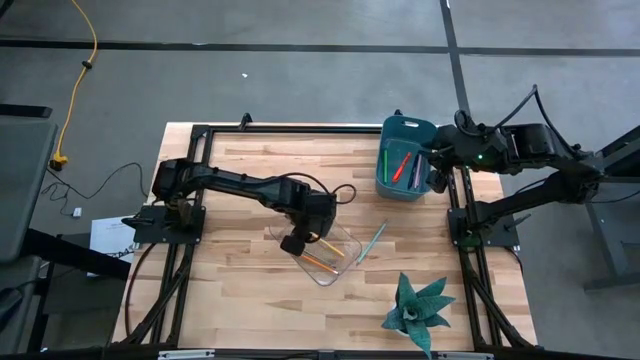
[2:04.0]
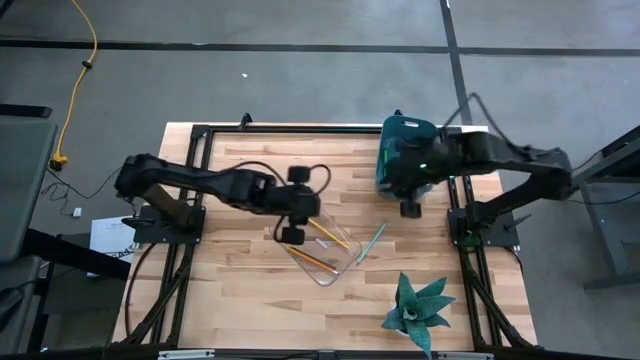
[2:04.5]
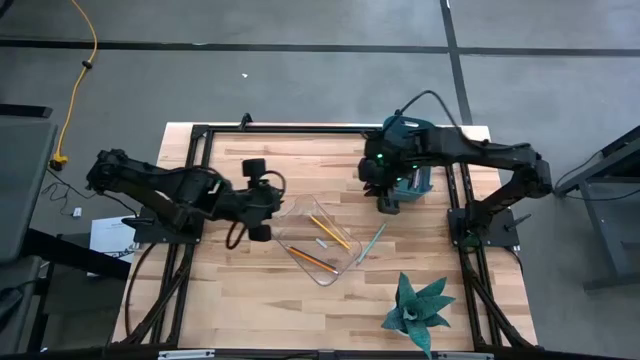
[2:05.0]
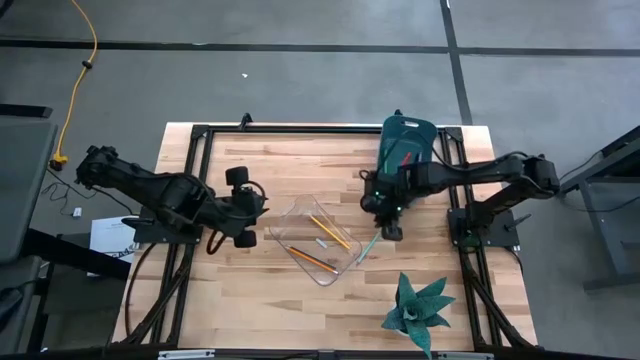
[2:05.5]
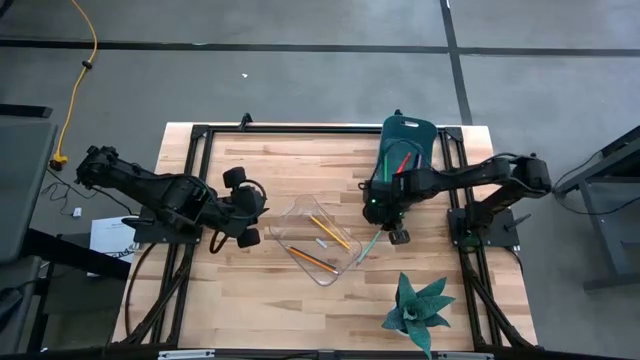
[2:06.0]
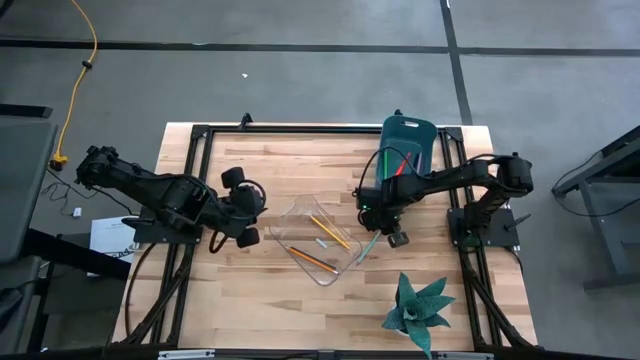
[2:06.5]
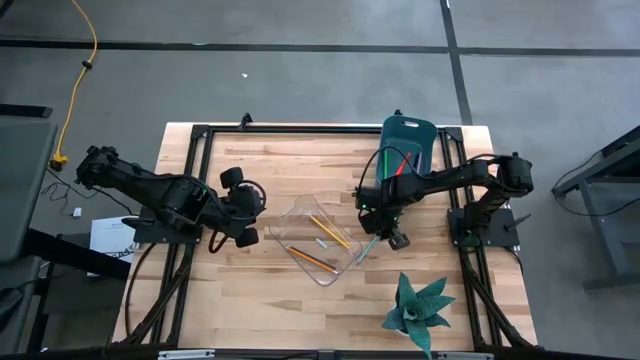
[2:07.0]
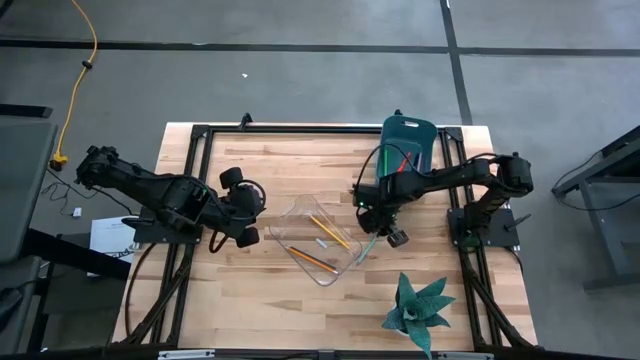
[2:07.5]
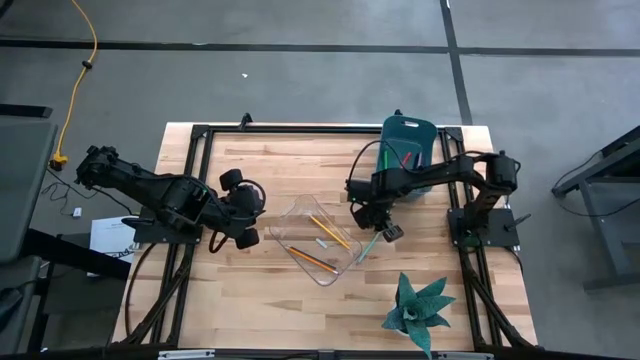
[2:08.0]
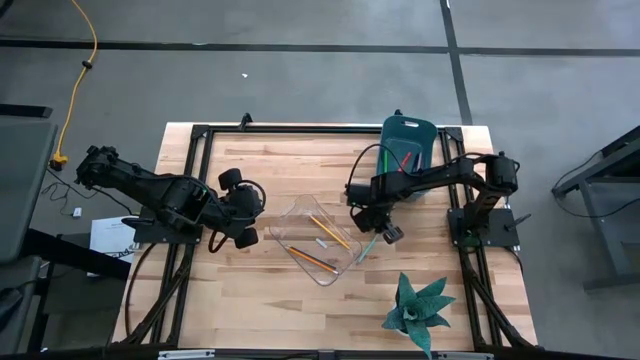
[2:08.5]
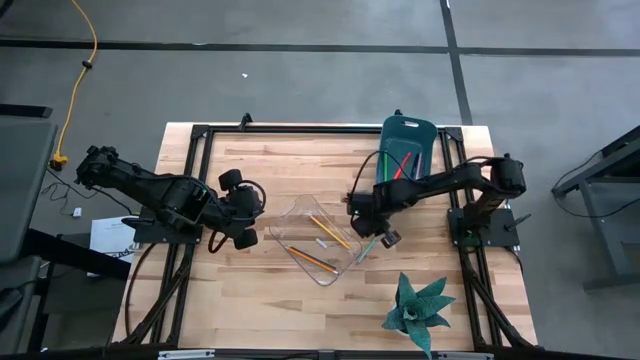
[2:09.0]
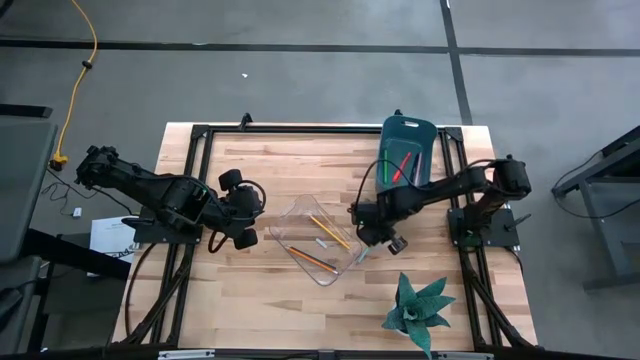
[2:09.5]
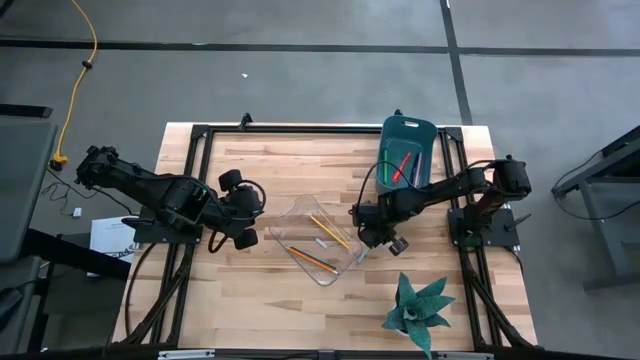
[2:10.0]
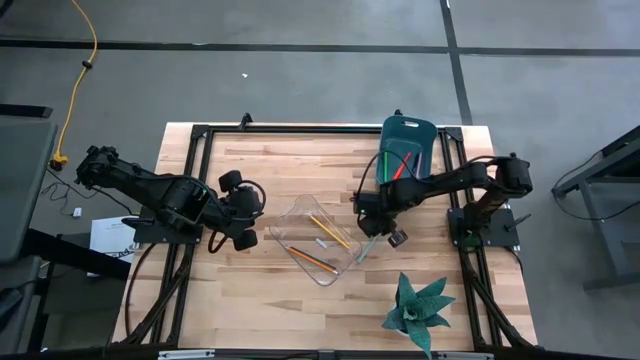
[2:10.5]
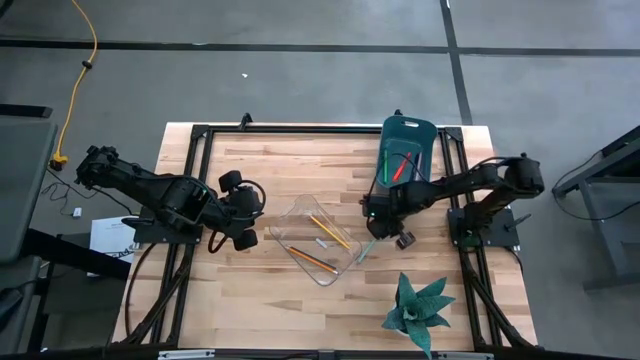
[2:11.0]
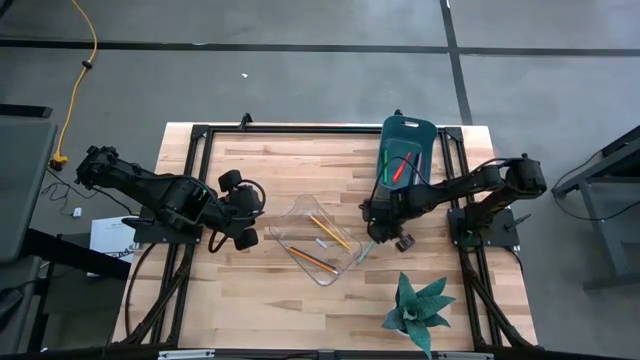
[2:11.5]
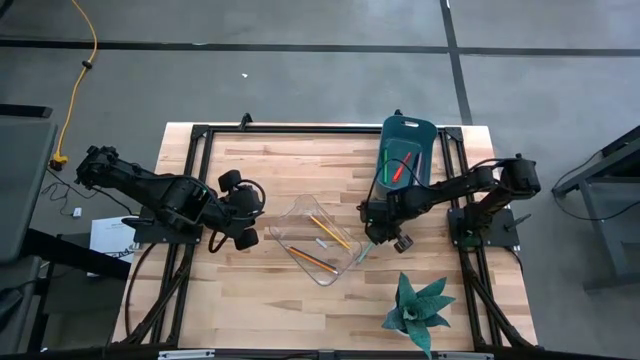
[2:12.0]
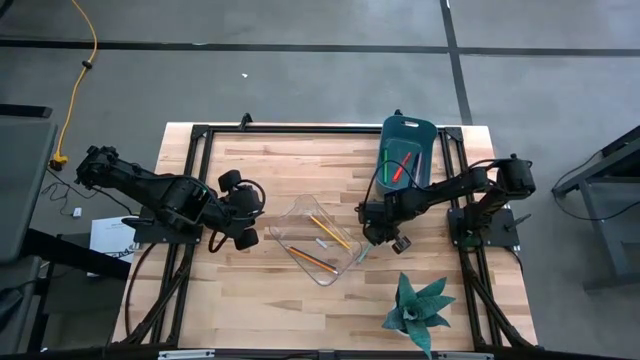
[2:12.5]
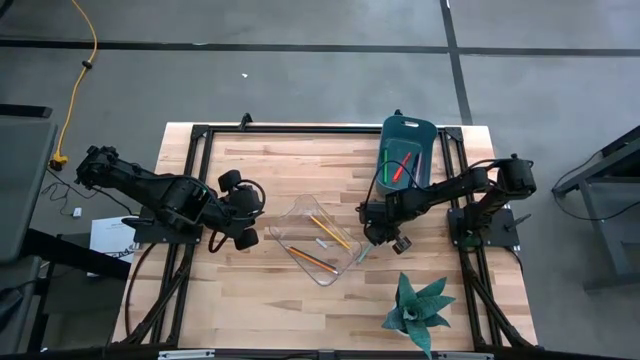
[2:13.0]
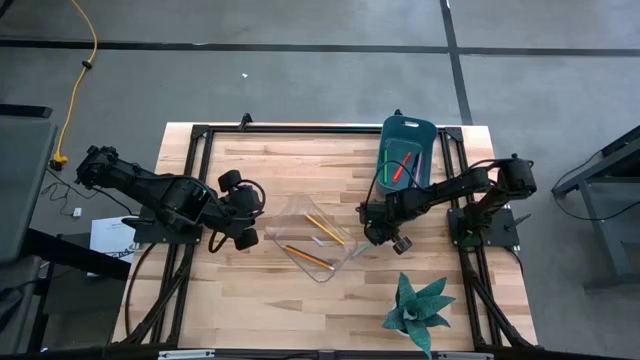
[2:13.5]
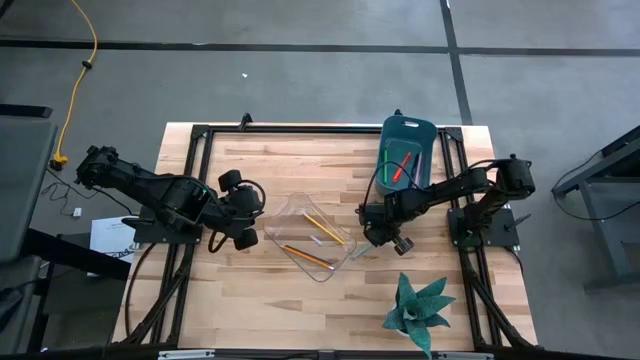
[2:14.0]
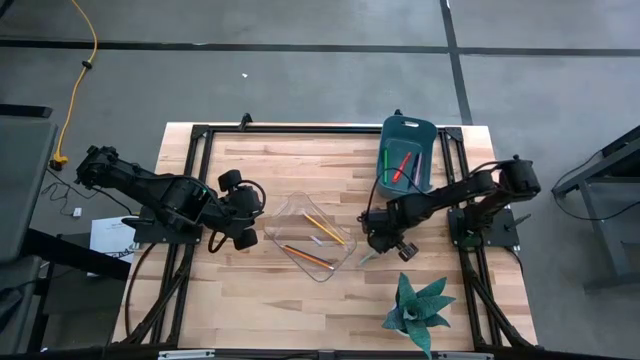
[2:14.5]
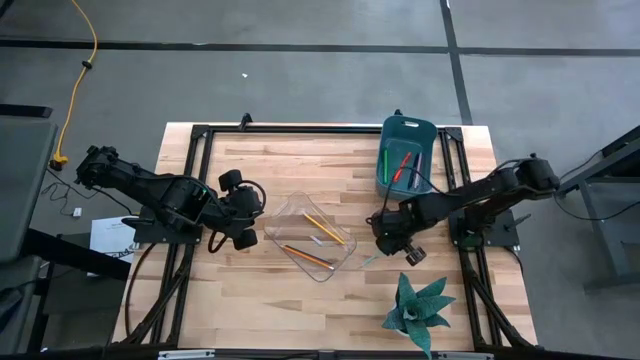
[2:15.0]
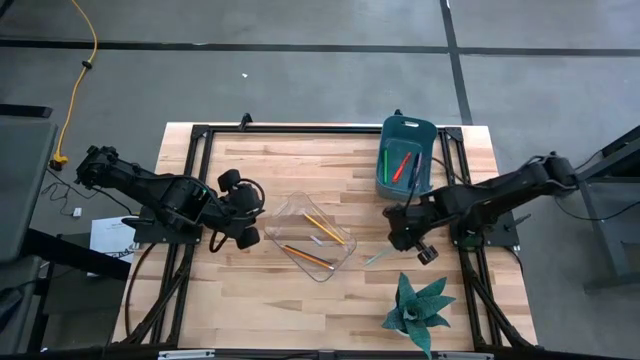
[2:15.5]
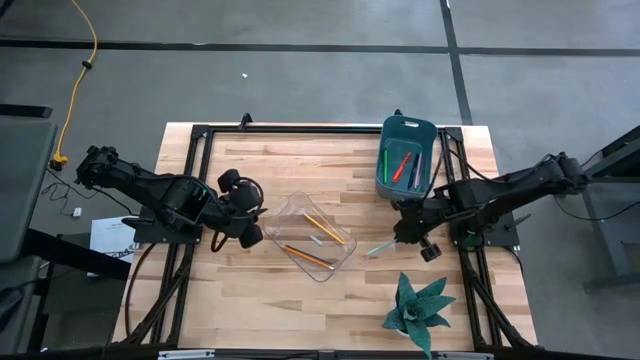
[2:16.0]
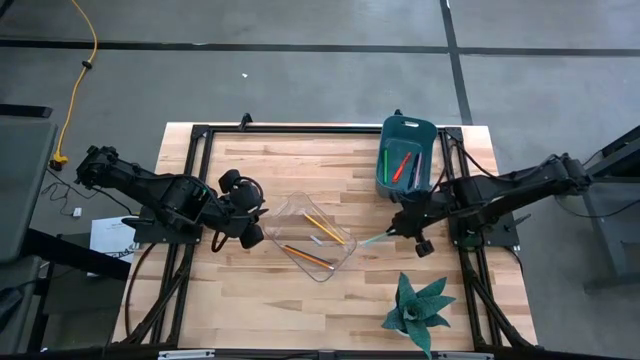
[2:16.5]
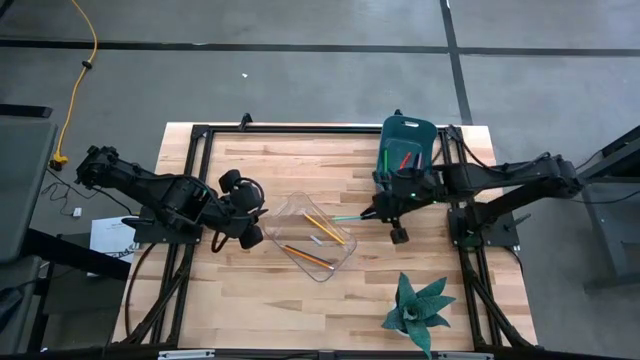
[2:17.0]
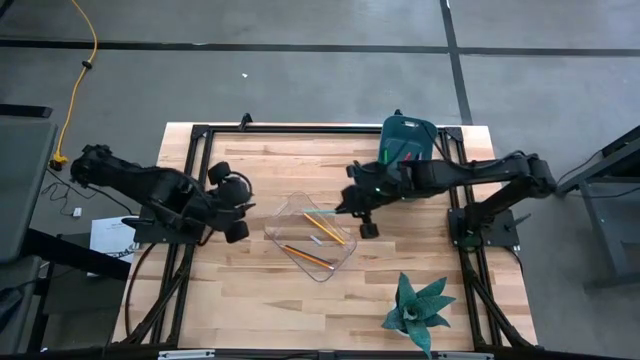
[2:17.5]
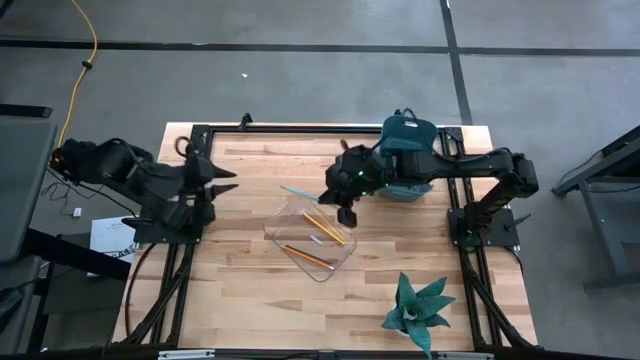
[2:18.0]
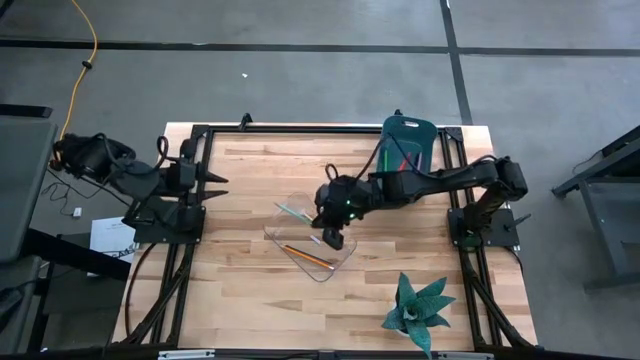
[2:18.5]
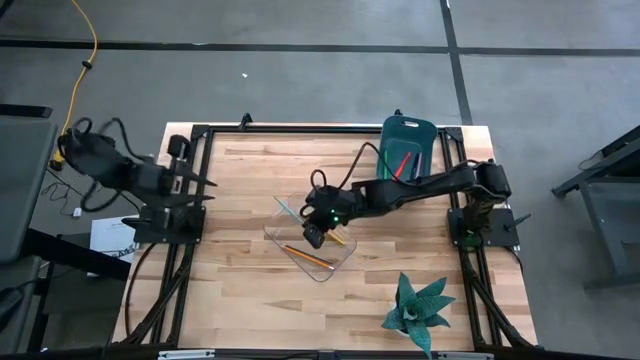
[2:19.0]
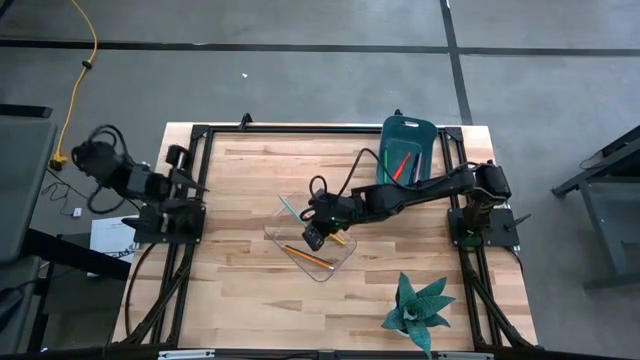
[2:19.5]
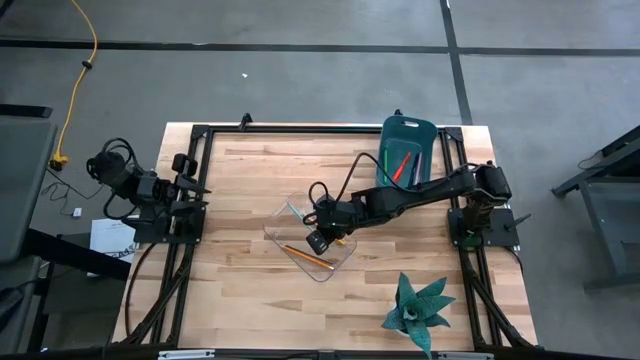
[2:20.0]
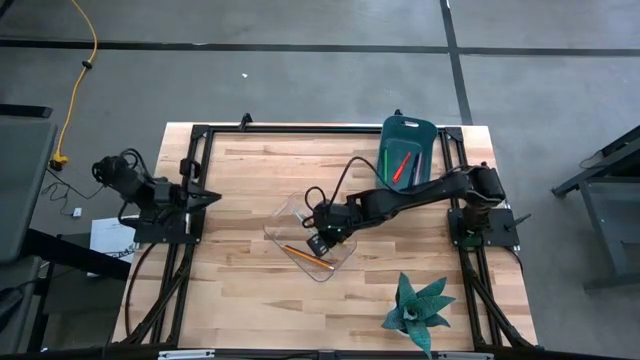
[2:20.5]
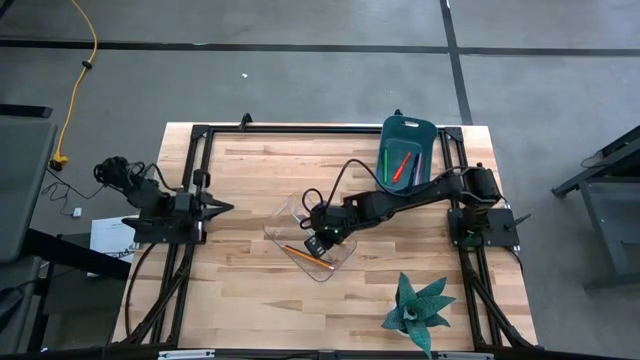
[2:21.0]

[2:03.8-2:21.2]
Task: Sort pens & pencils
Put the blue pencil into the transparent bin

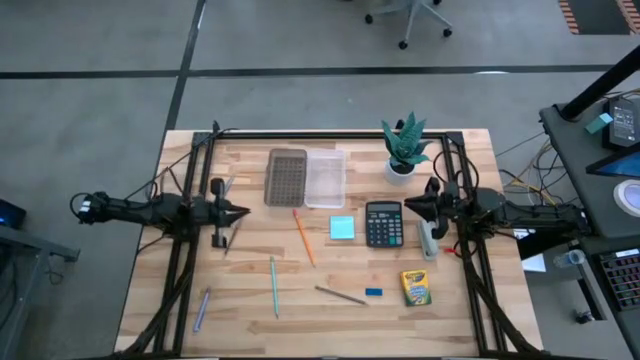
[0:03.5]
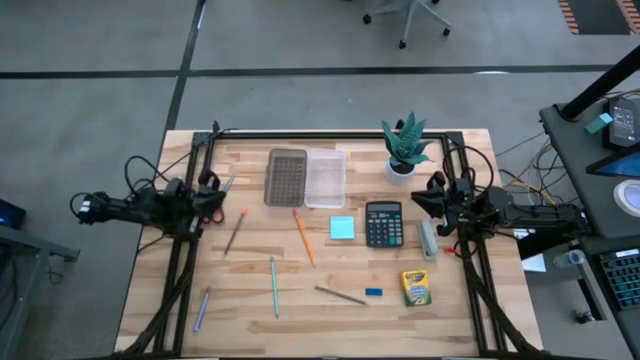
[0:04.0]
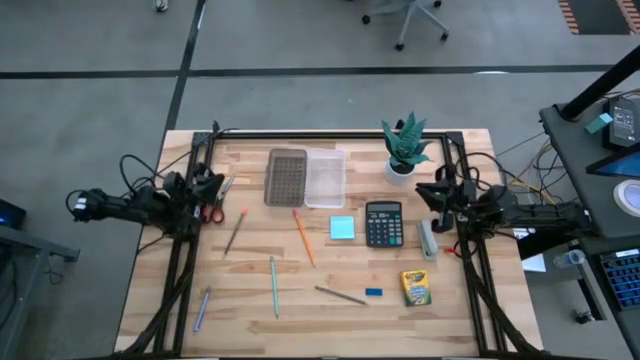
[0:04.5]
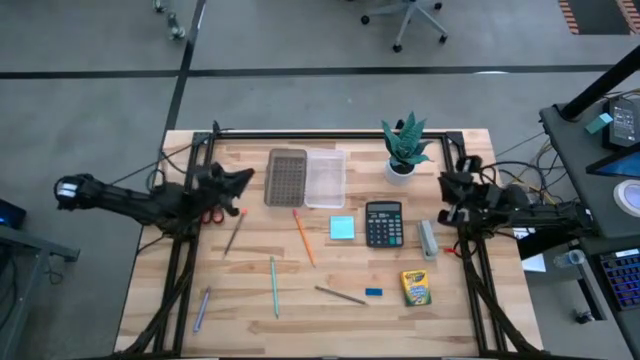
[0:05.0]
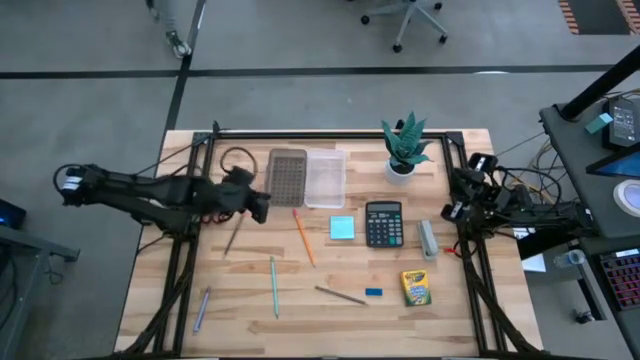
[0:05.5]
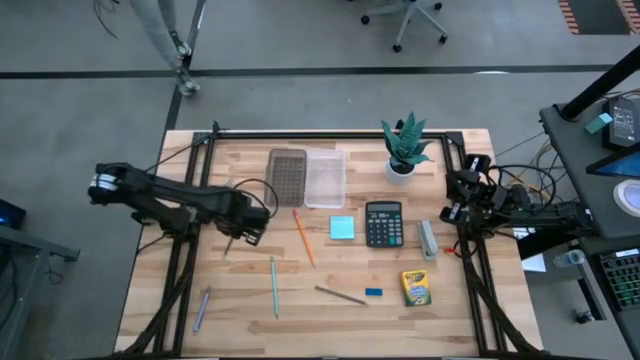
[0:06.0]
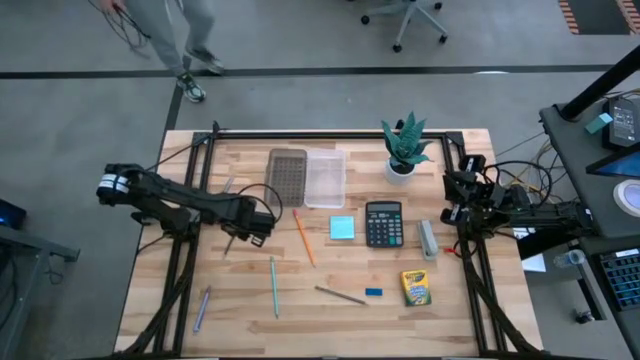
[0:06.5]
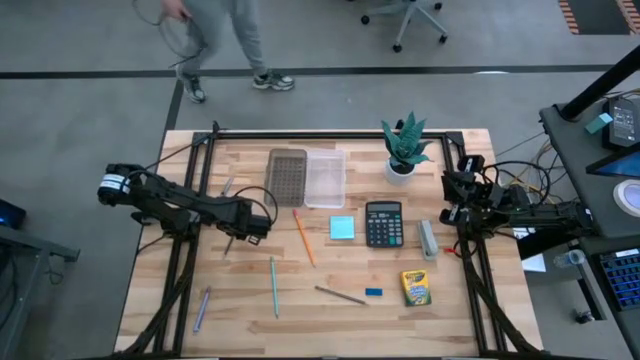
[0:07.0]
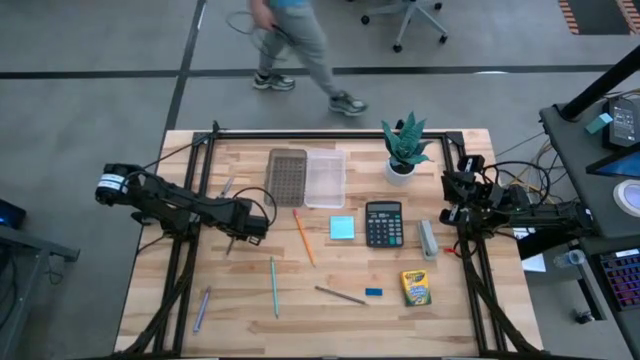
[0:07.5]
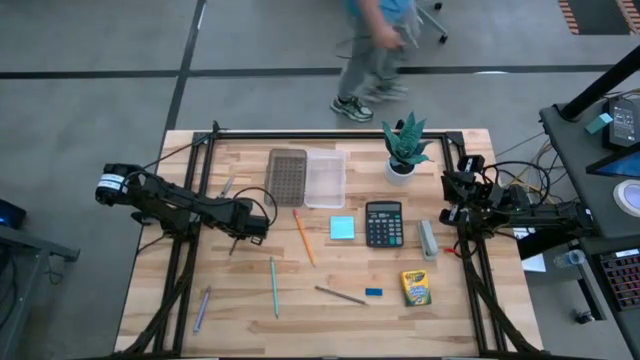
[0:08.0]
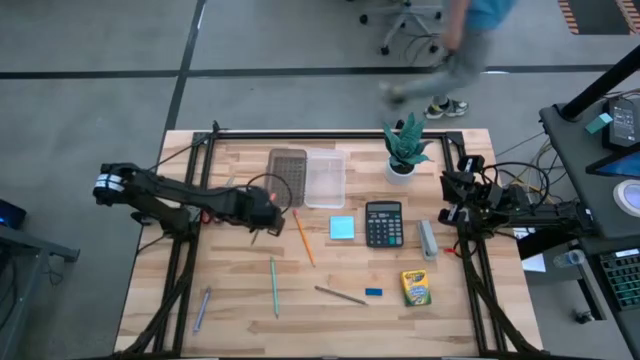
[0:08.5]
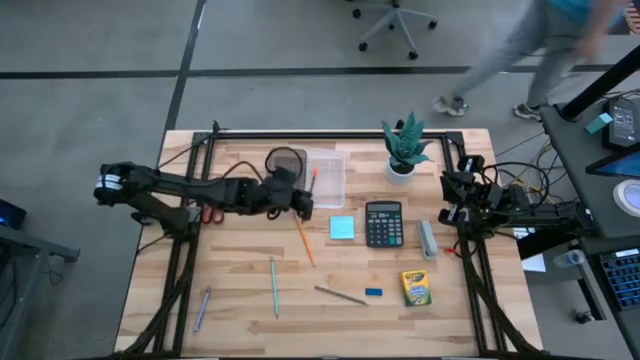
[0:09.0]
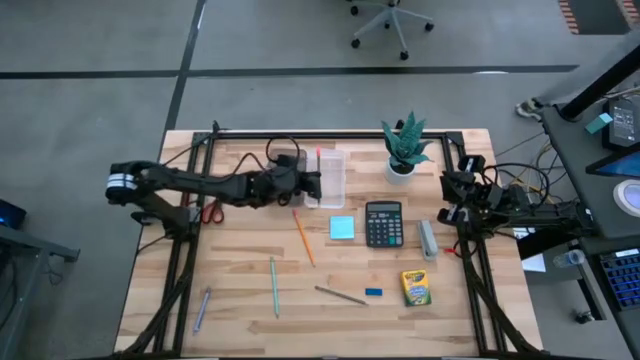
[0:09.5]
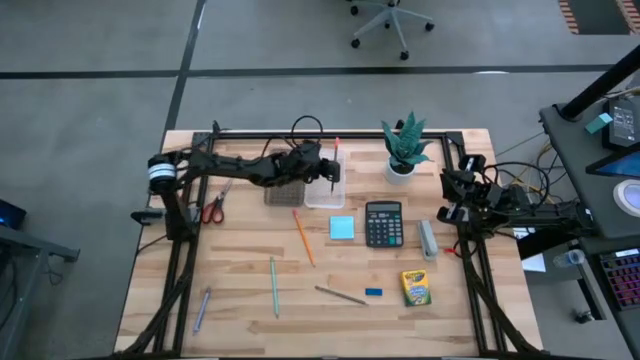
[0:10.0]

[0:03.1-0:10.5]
Task: Pack school essentials
Put the top black pencil into the transparent supply box
